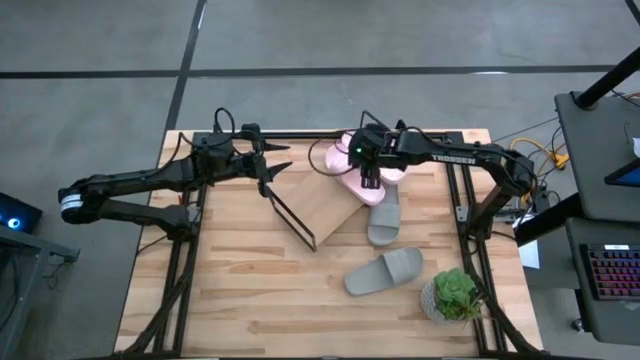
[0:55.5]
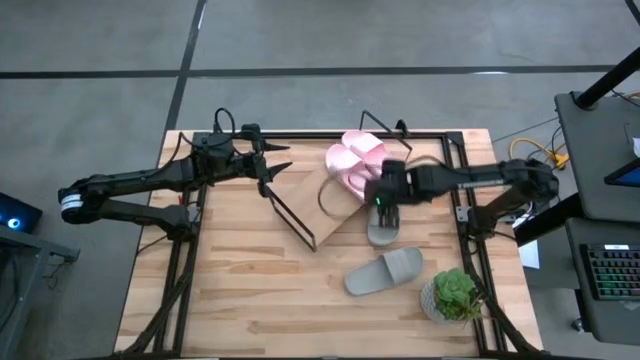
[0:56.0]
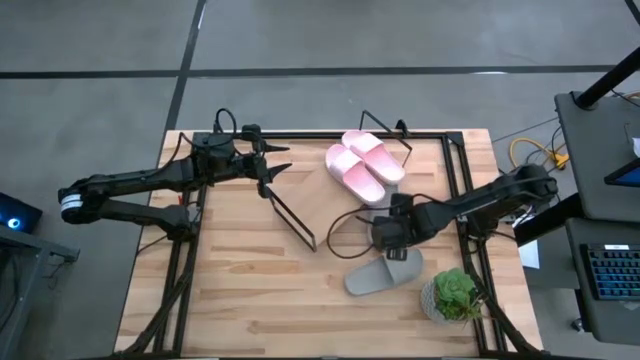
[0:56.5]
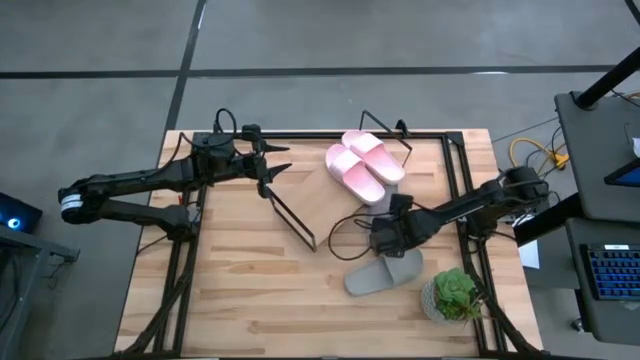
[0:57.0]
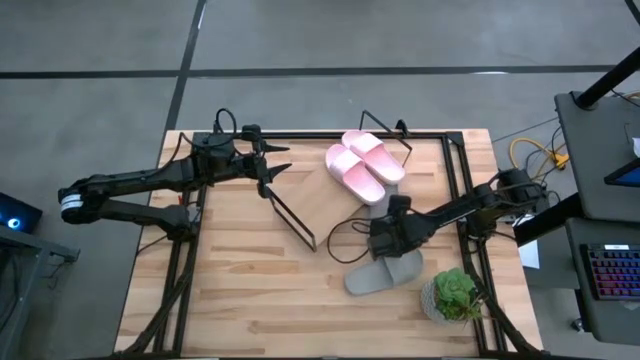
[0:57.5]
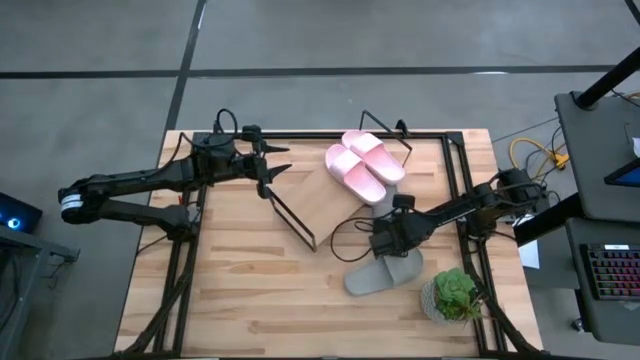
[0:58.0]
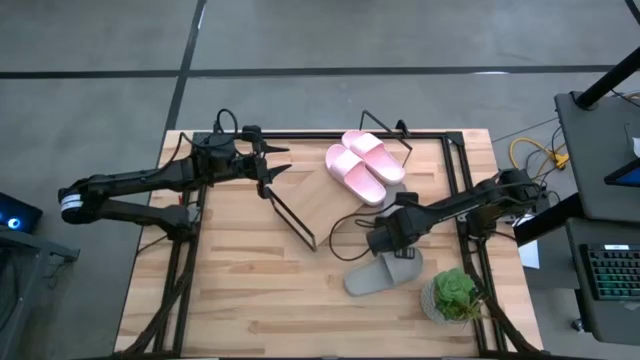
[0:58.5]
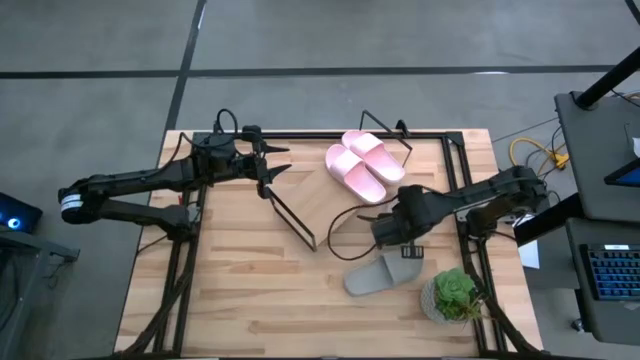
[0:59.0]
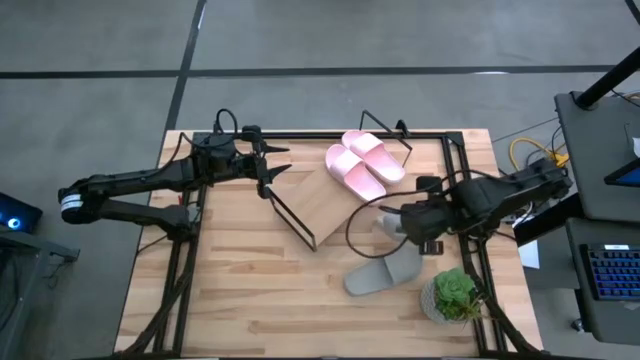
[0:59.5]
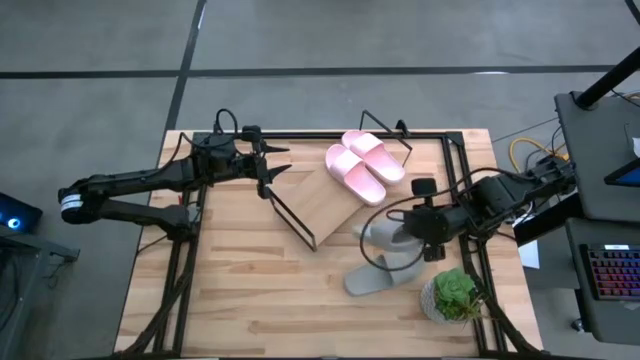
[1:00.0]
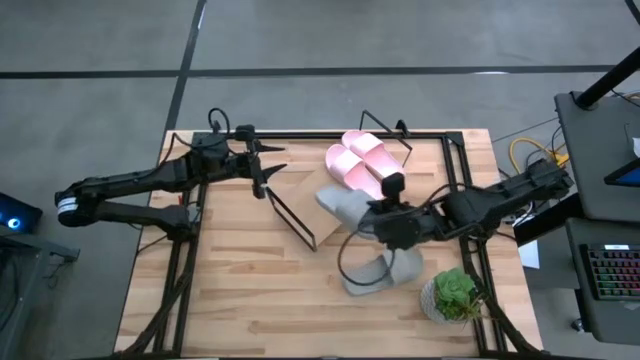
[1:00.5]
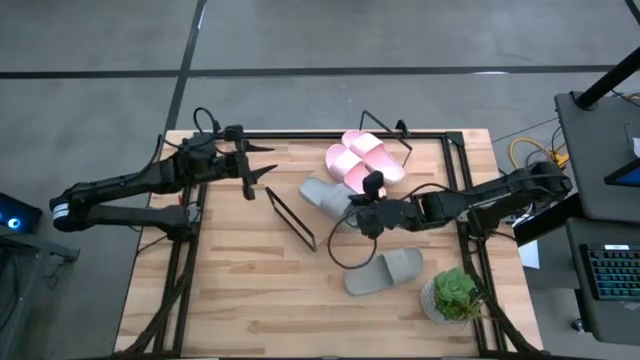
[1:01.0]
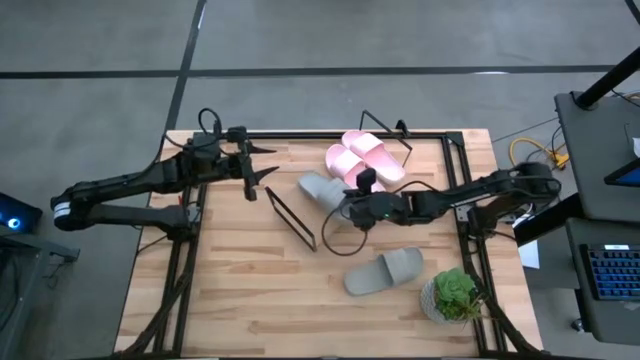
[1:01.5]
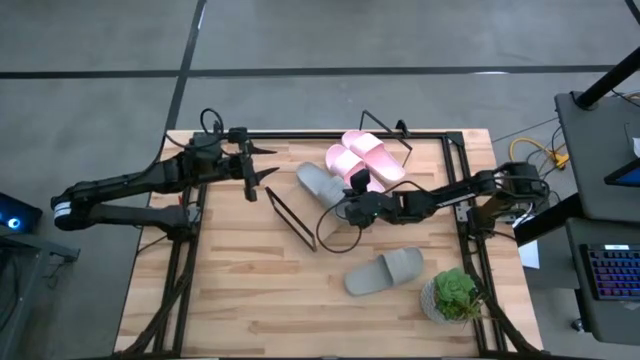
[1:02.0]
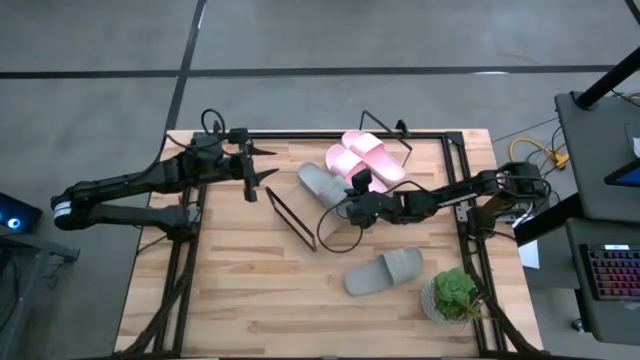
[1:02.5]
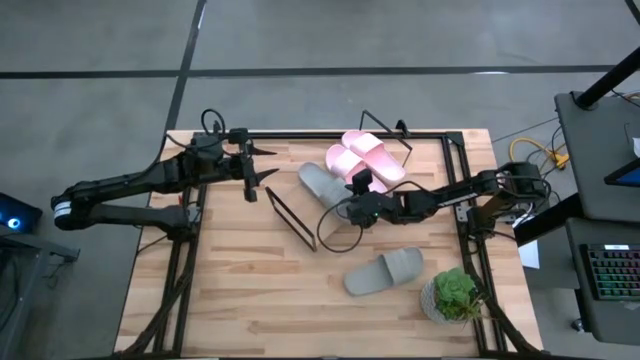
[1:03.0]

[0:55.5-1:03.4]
Task: Pick and place slides into the shelf
Put the top gray slide on the shelf

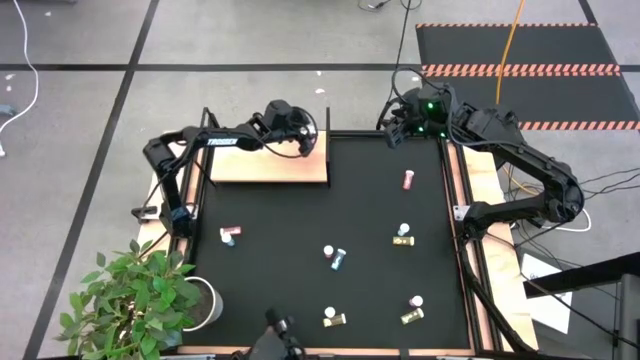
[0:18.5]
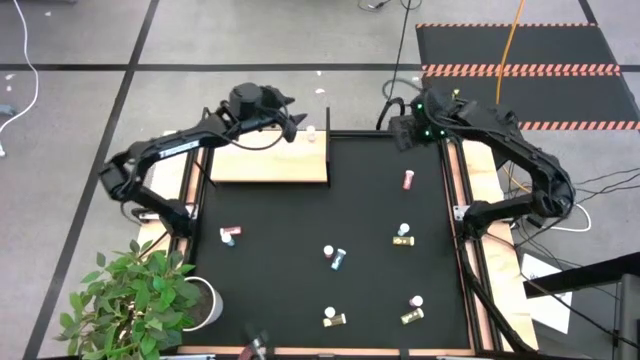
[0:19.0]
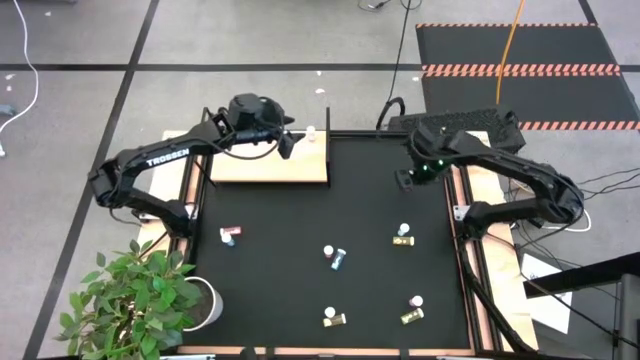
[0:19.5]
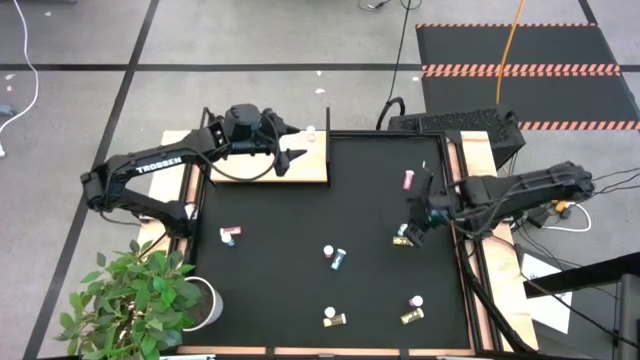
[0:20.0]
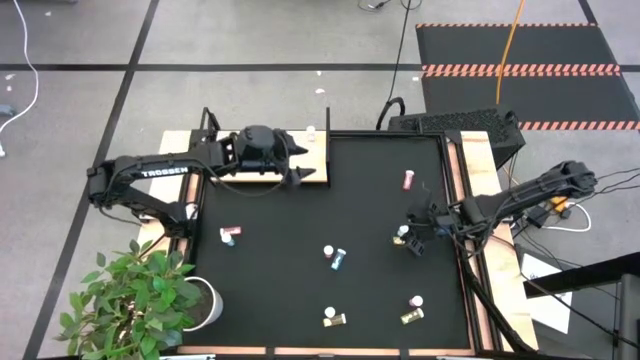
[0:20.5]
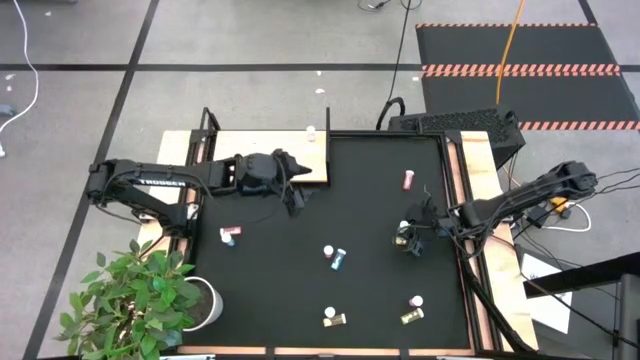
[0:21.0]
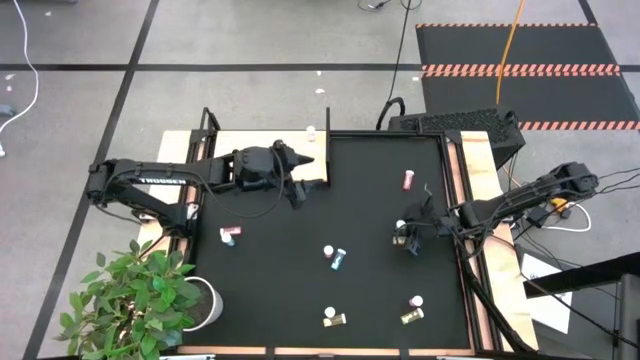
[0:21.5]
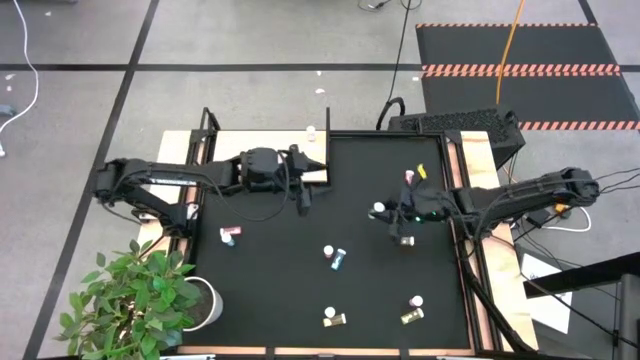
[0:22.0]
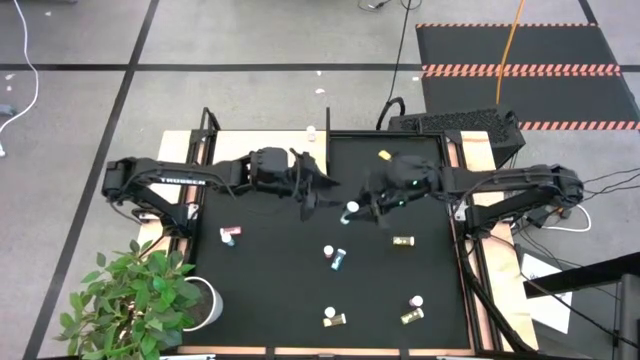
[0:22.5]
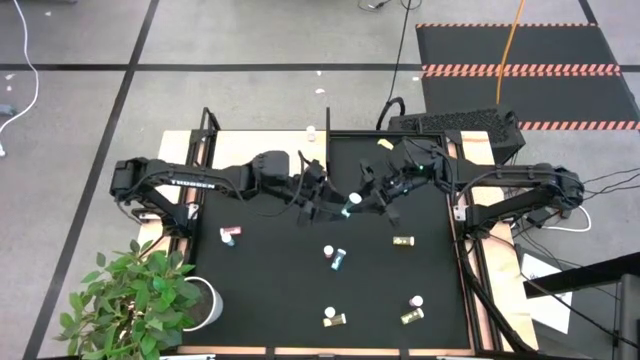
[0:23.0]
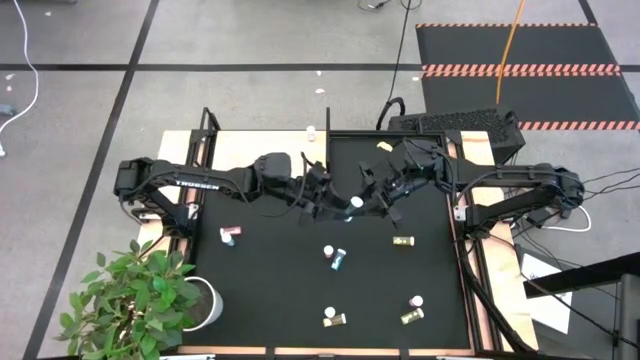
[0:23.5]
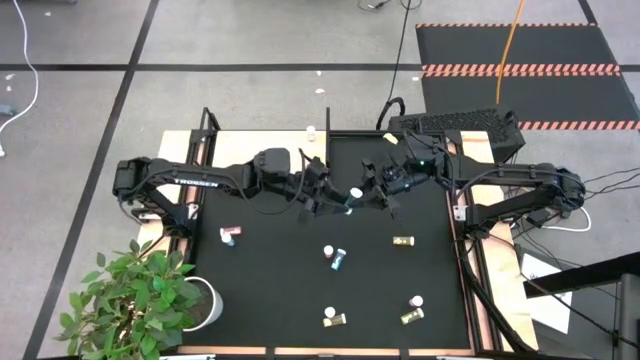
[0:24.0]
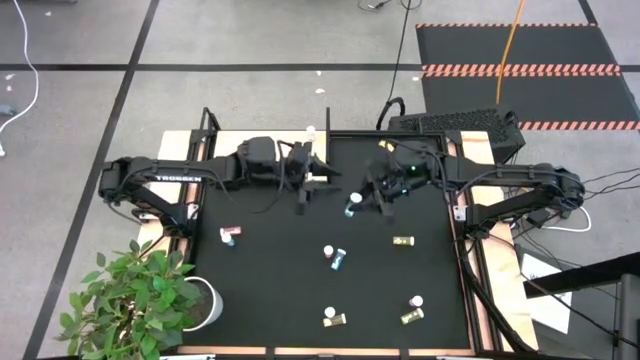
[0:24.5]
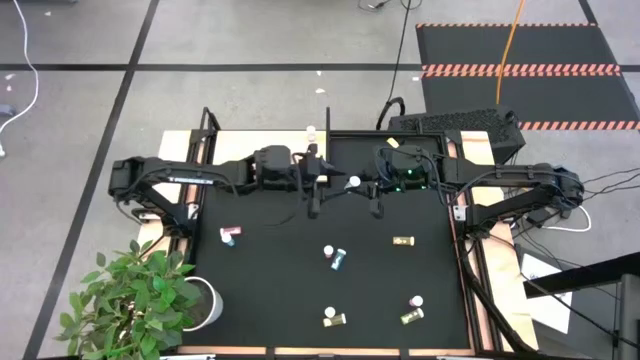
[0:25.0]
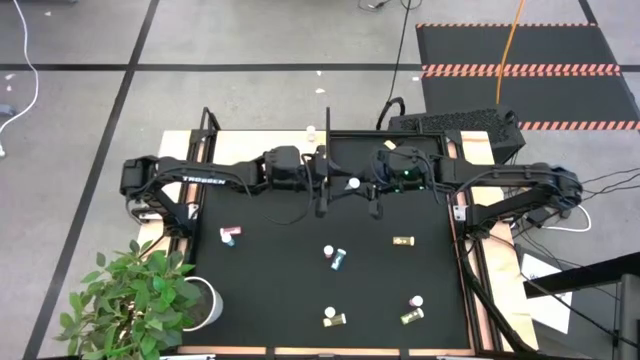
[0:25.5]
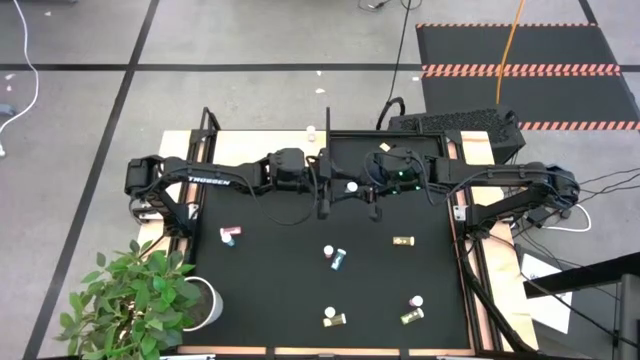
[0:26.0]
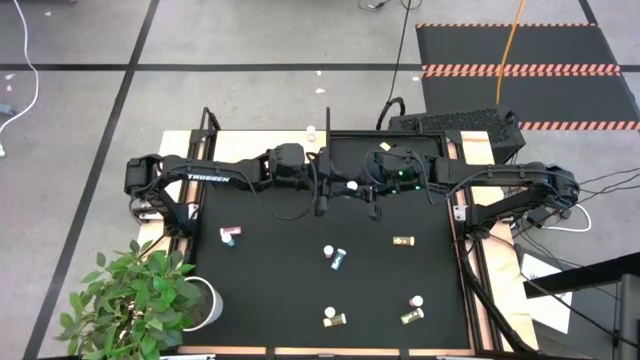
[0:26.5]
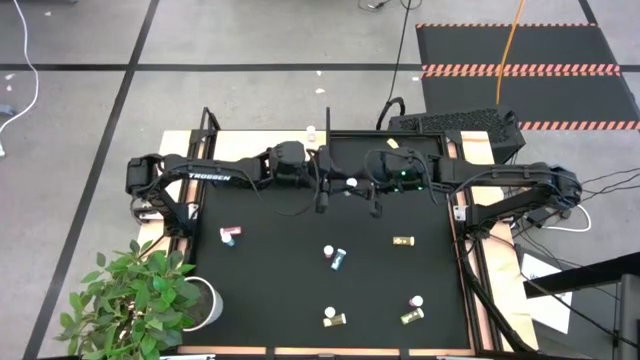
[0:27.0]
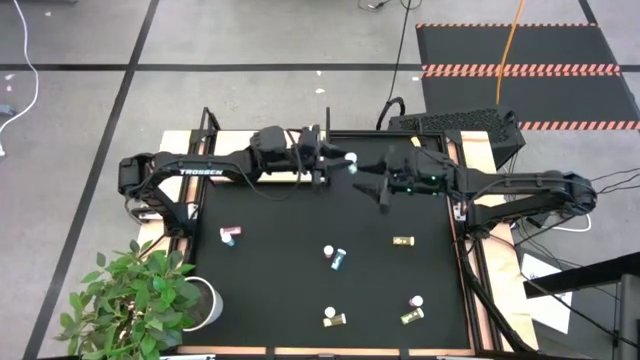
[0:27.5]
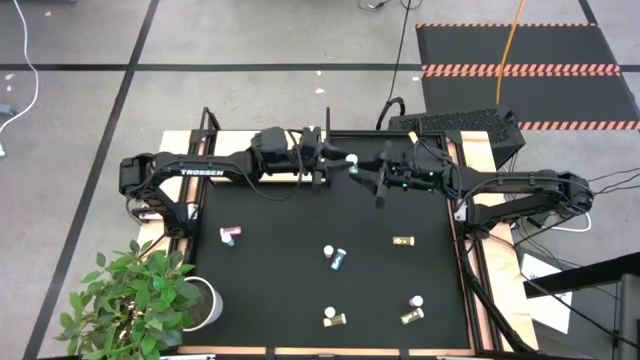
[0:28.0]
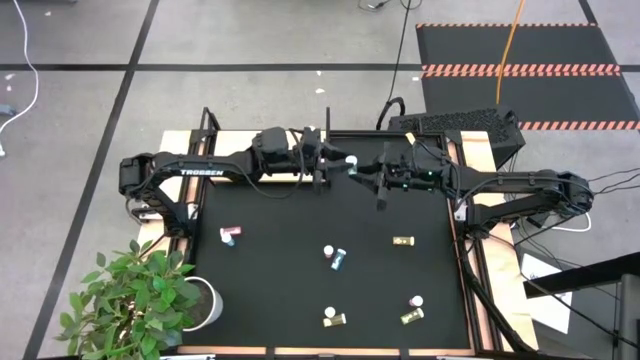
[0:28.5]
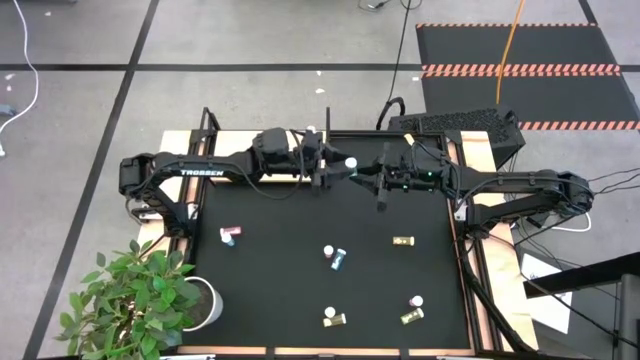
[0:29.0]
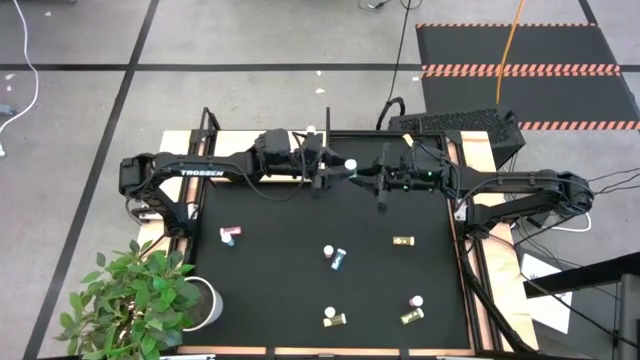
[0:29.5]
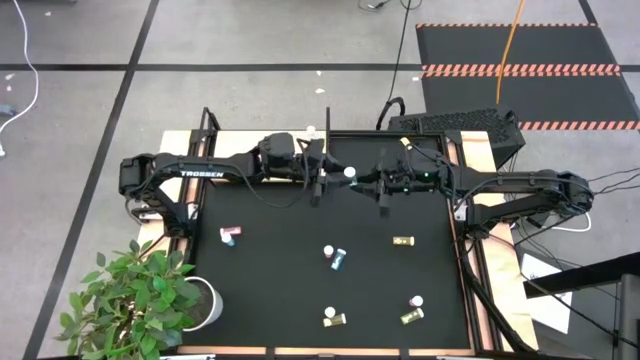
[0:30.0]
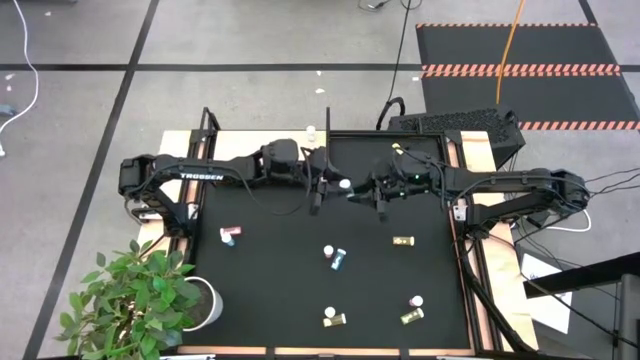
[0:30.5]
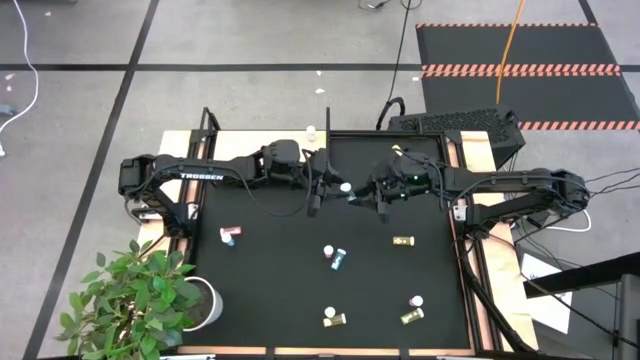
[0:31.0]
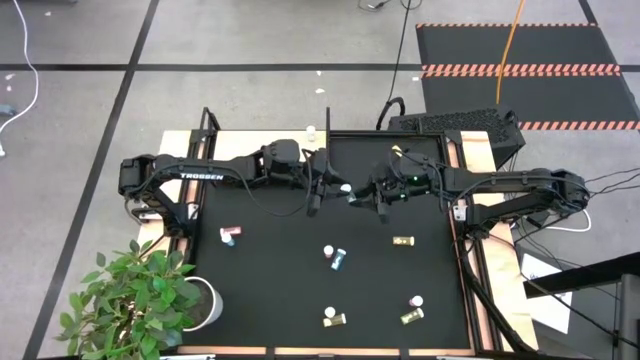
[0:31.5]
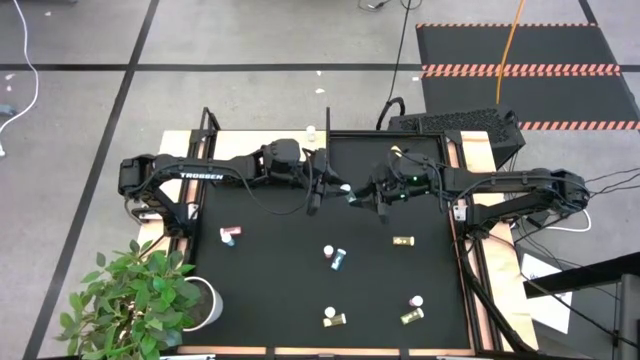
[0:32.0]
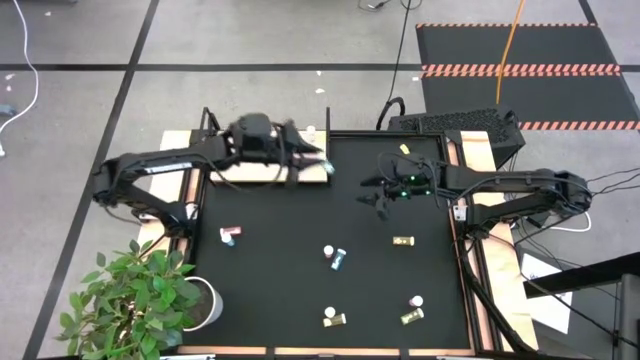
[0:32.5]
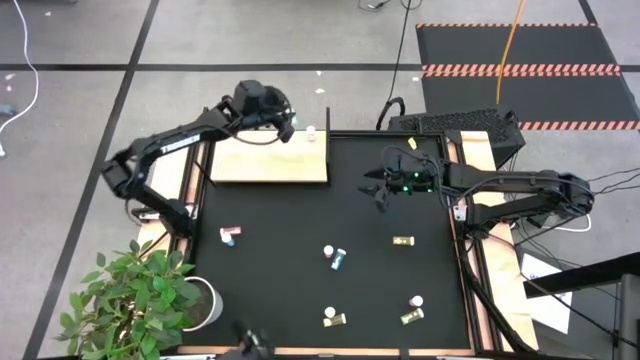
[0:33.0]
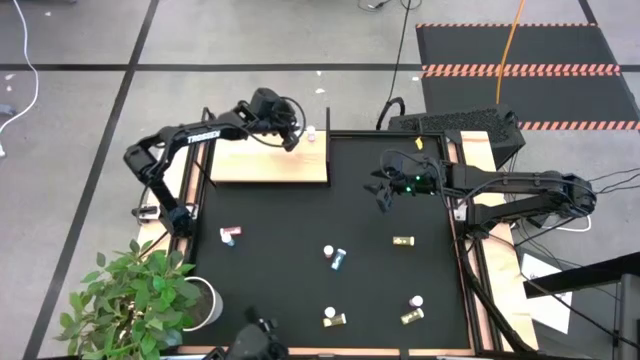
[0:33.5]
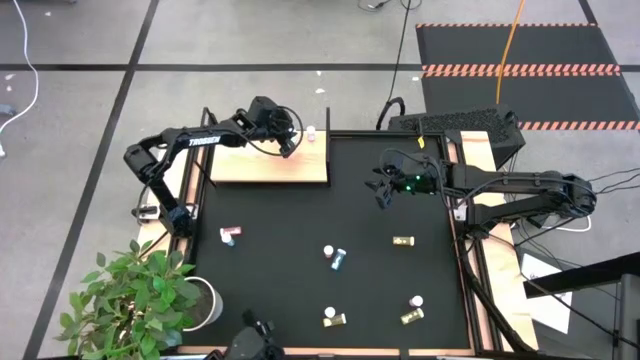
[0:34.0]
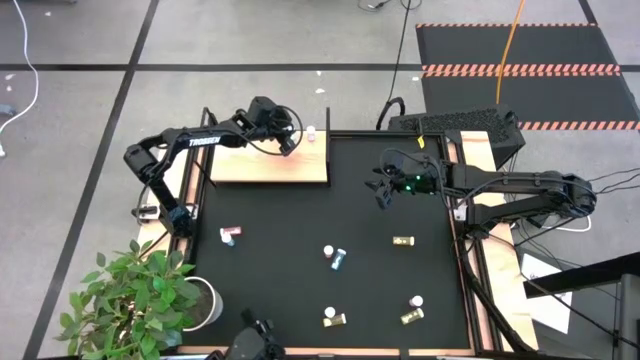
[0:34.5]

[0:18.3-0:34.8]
Task: Pick and place medicine bottles onto shelf by color
Put the middle right blue pill bottle on the shelf
